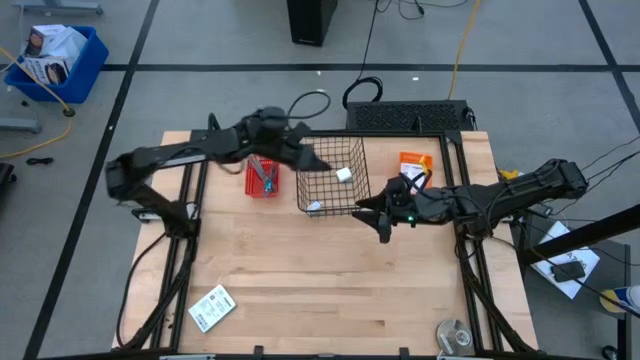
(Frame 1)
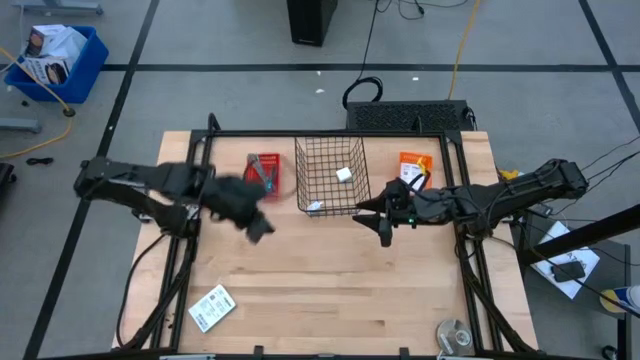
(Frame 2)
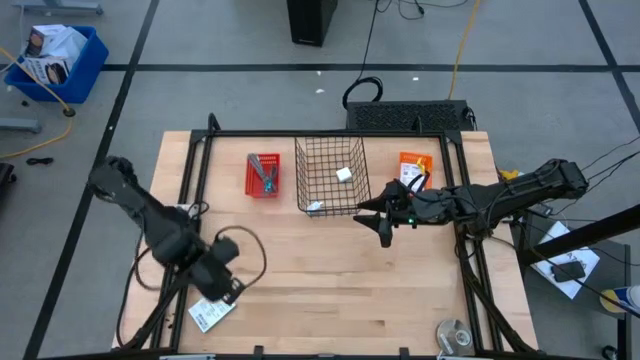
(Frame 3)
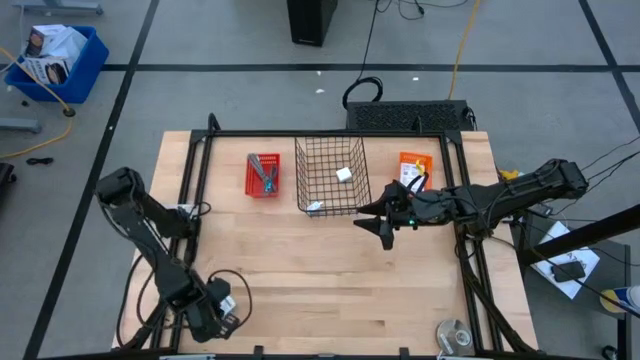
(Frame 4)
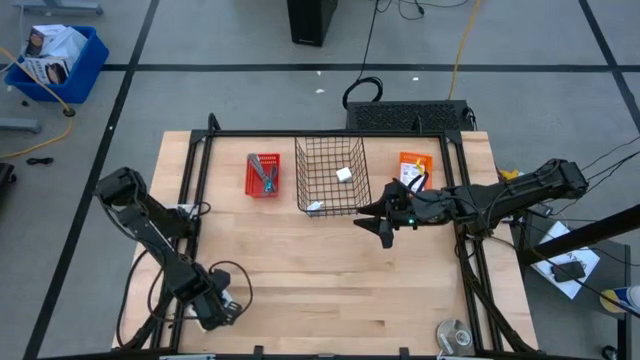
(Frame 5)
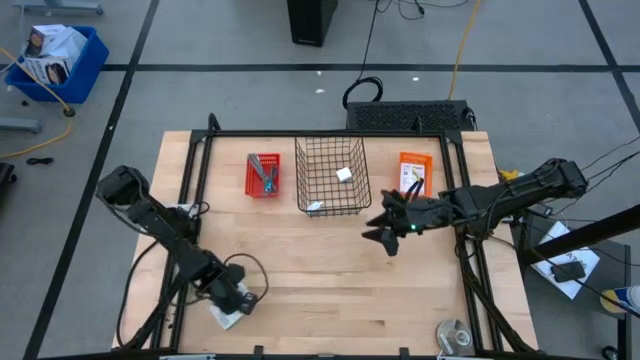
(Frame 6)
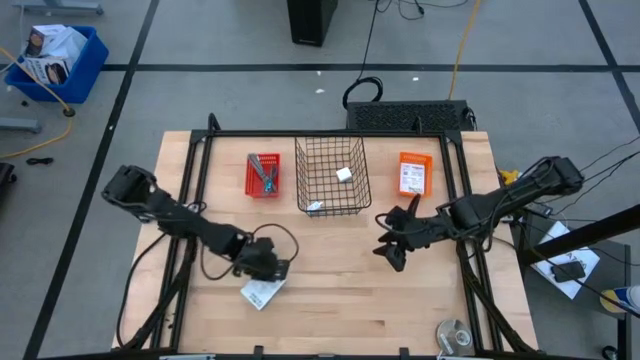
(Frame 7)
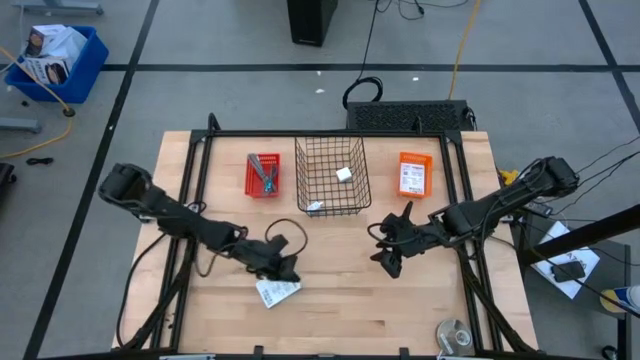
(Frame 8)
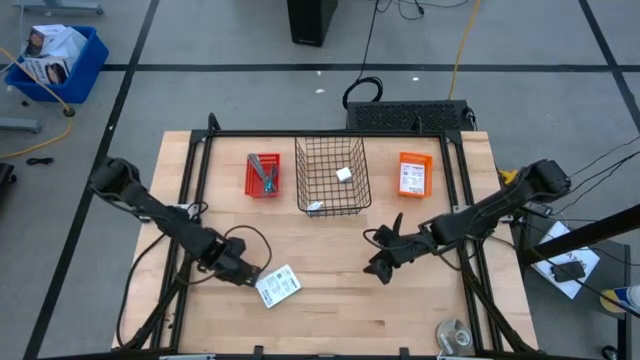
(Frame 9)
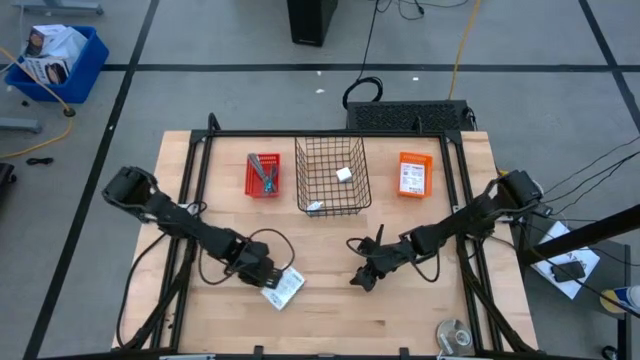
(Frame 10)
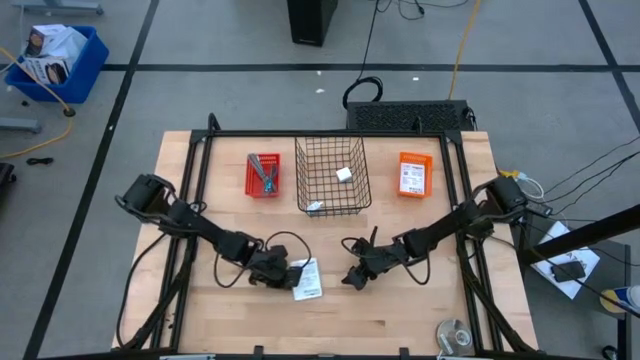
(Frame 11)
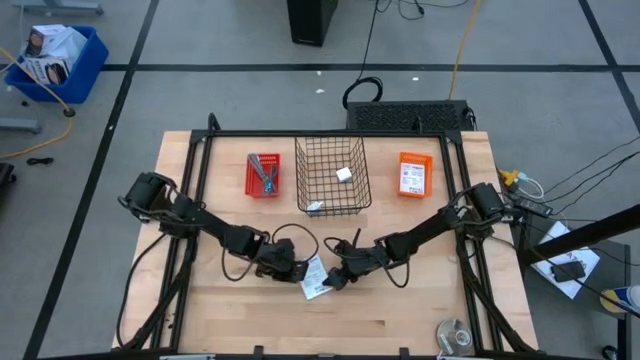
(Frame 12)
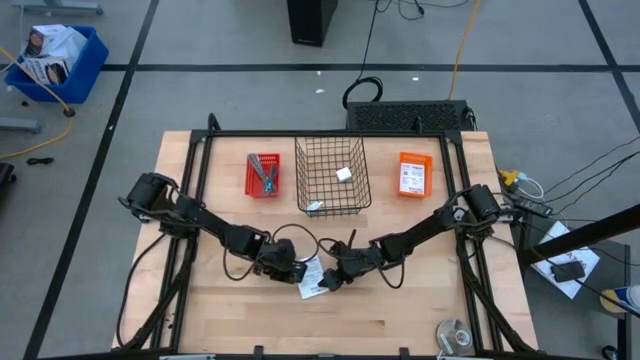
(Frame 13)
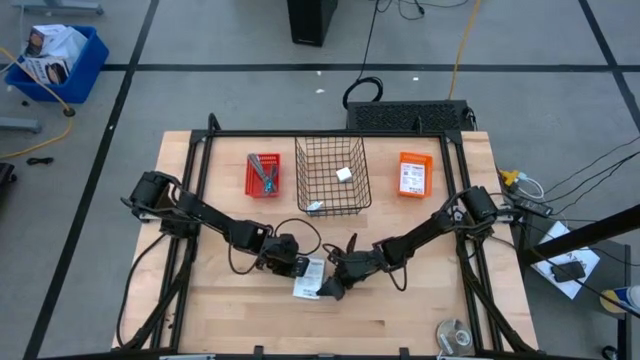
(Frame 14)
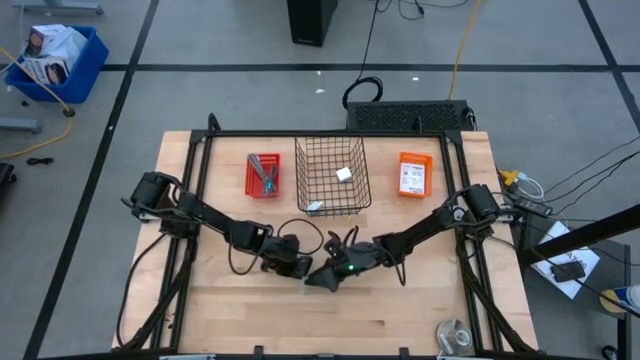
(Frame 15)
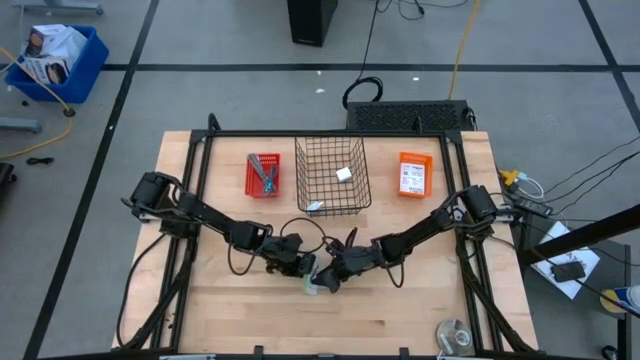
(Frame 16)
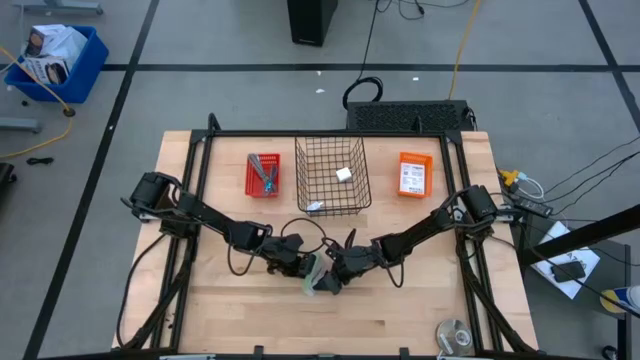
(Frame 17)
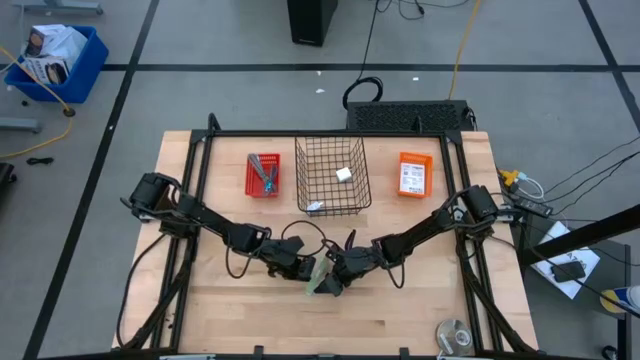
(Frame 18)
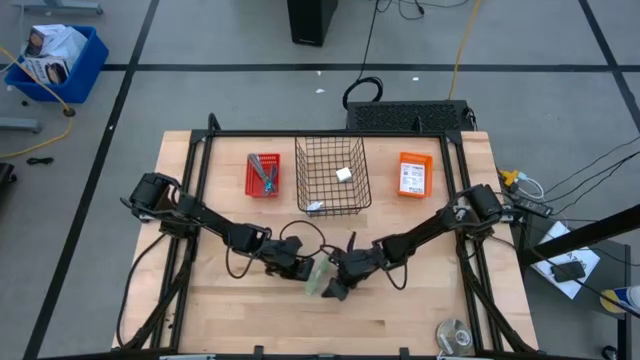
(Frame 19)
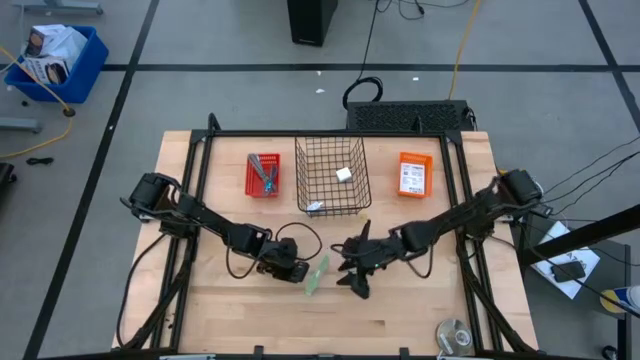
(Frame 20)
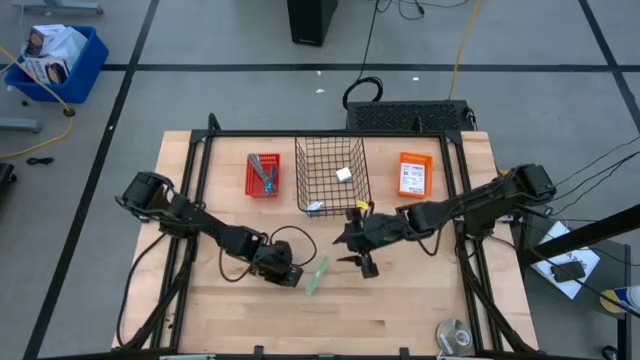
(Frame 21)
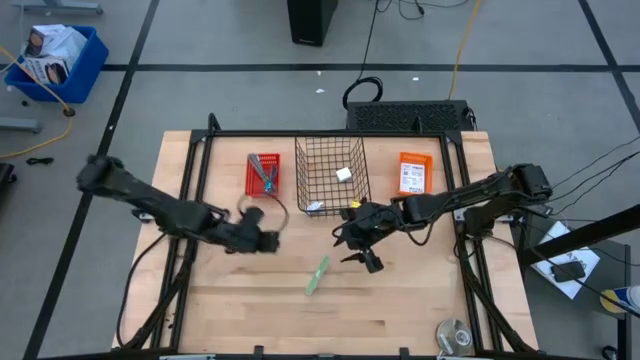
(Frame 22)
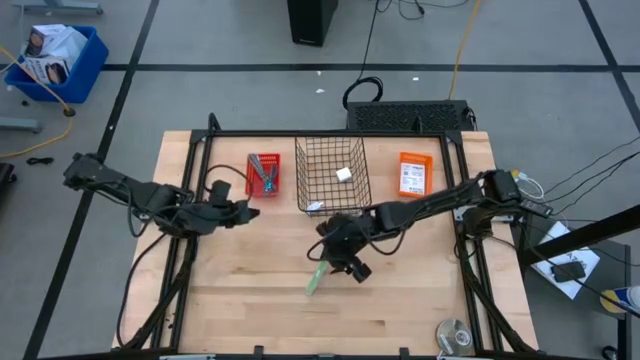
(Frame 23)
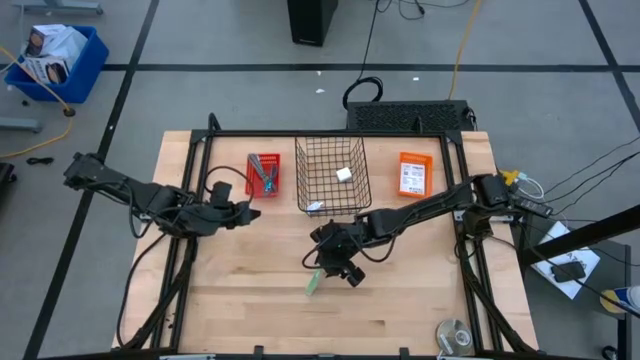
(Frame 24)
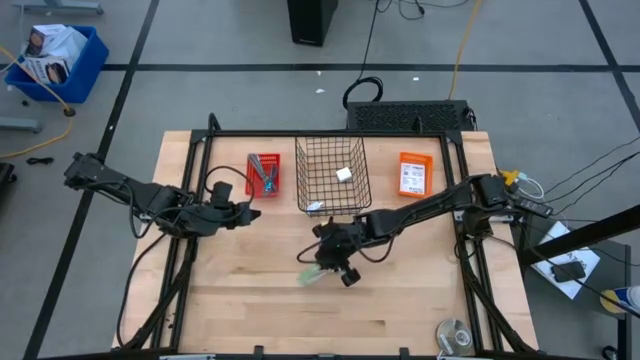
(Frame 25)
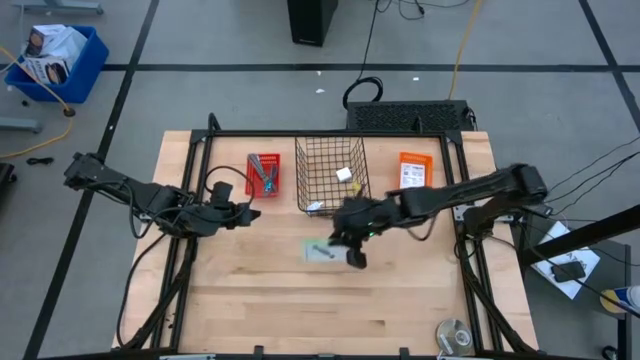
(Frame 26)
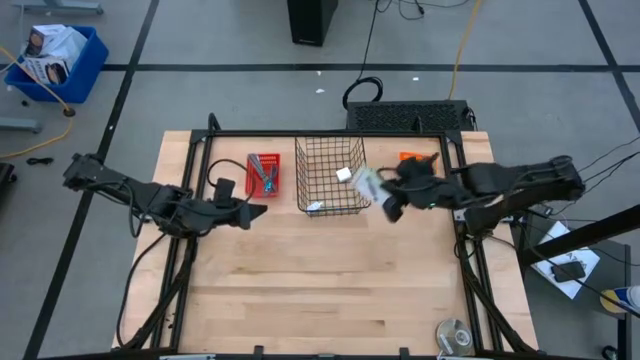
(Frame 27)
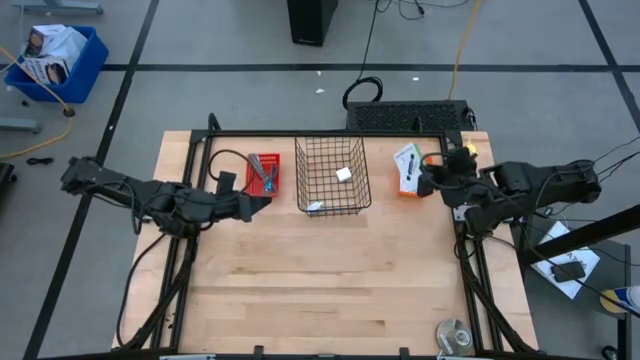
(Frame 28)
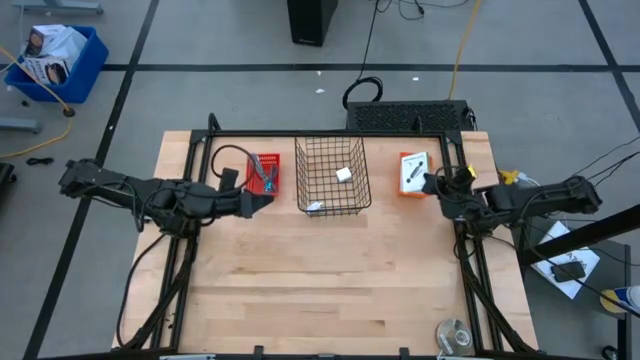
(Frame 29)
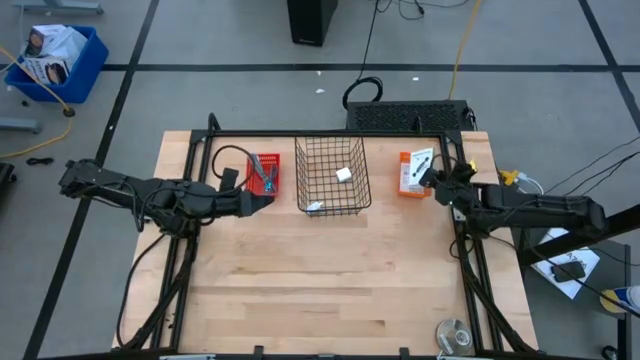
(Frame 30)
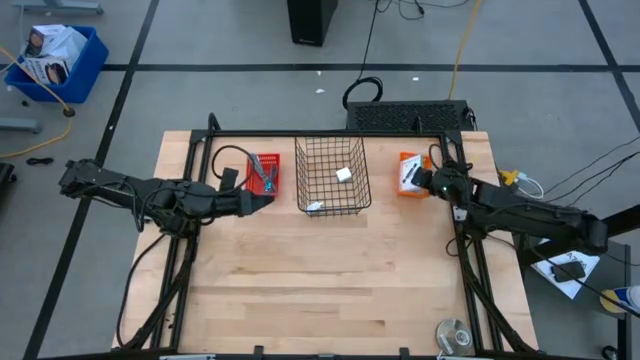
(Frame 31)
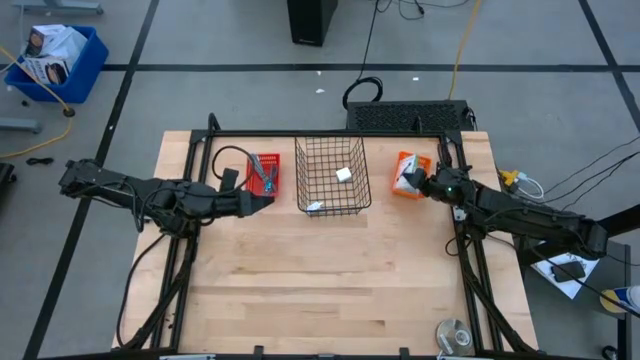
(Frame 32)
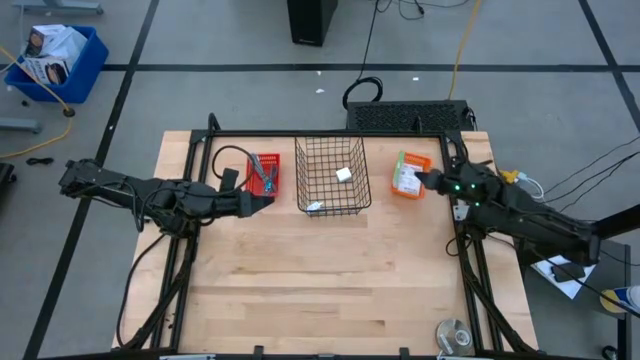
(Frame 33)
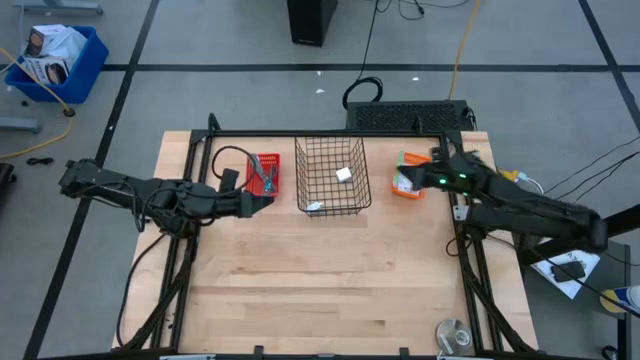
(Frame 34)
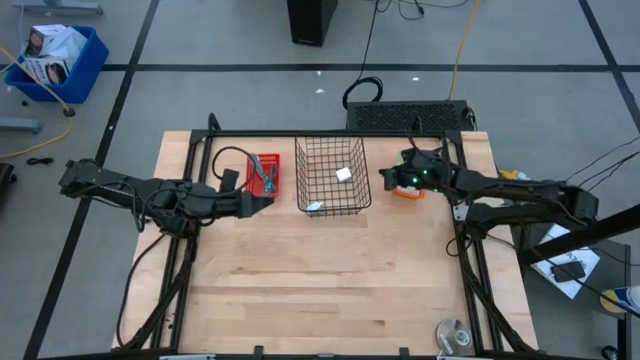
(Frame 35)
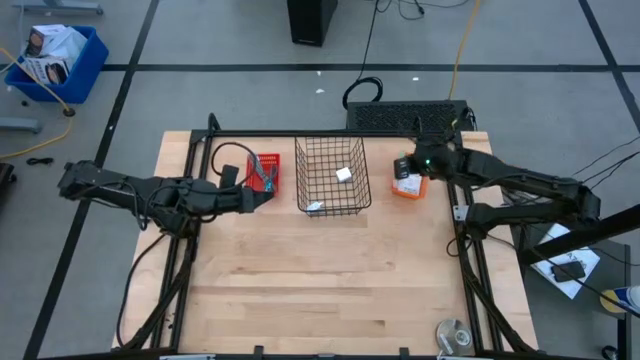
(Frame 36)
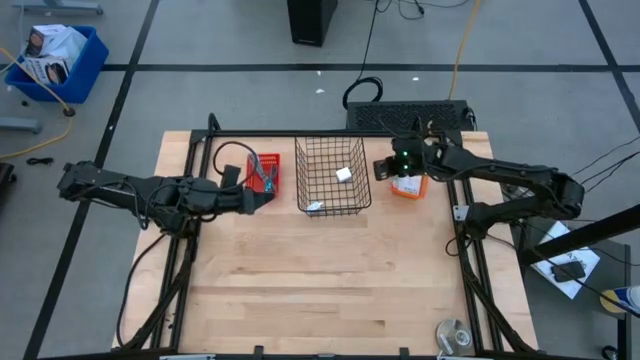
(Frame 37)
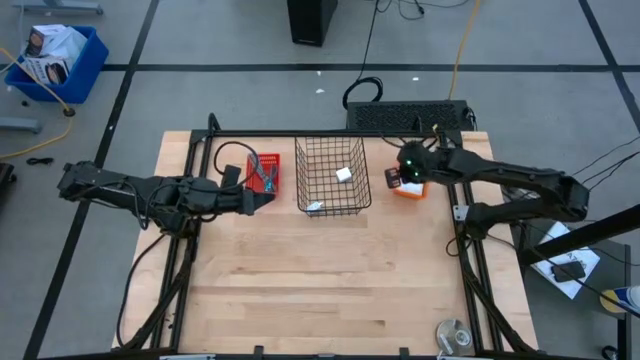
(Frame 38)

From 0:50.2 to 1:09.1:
Task: Pick and place items into bin
Stack the white box on top of the white box

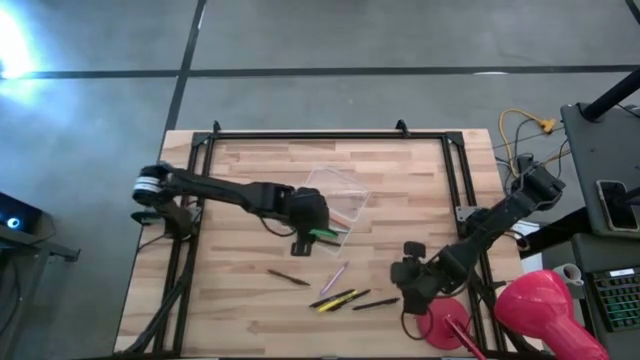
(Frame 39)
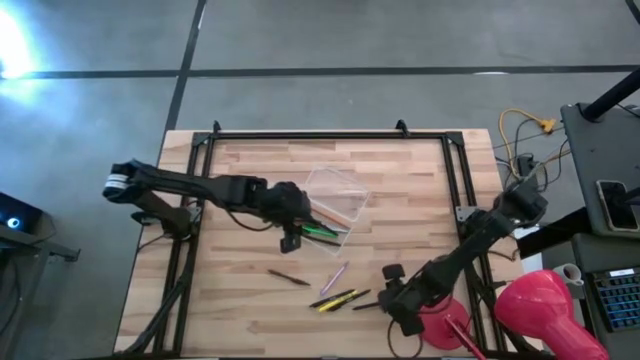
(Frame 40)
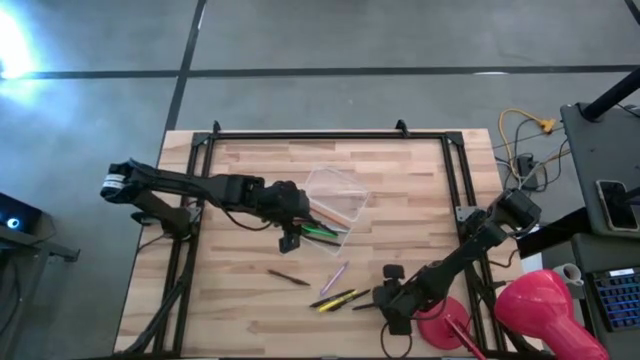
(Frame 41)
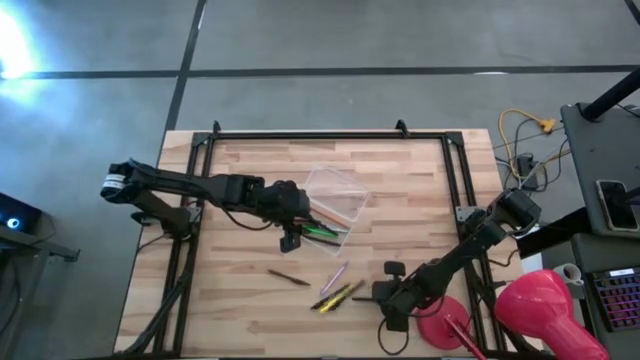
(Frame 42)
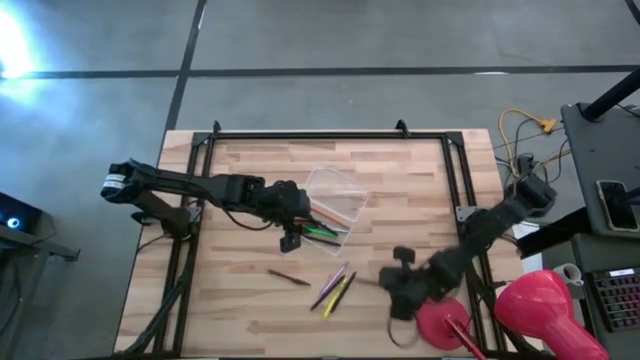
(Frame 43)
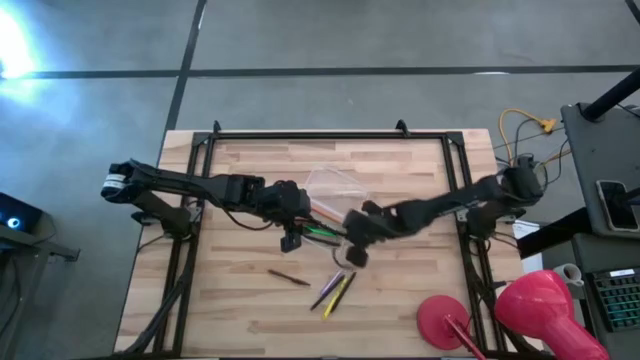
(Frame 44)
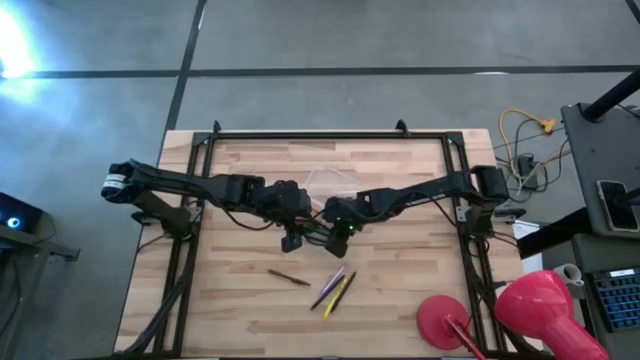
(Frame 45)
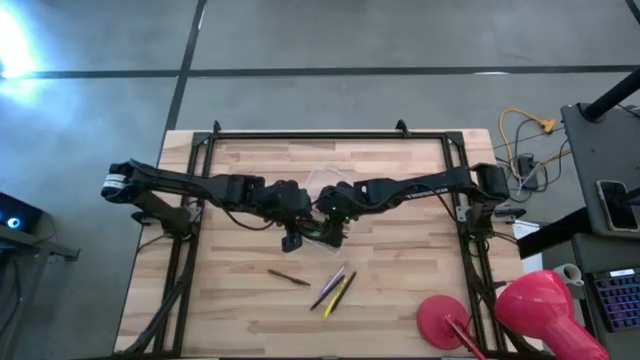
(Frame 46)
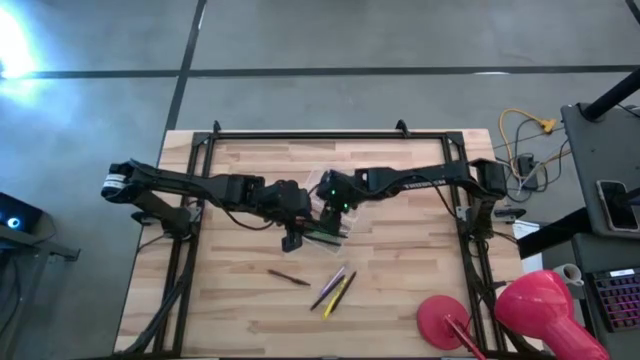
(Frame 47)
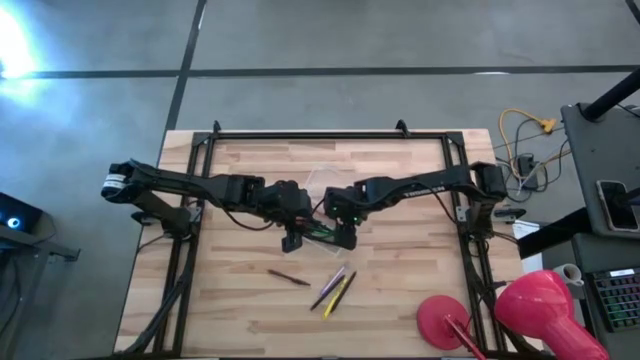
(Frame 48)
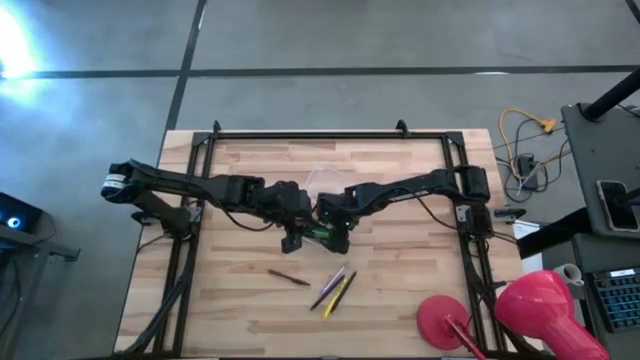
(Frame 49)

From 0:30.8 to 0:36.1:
Task: Pick & place school supplies into a supply box
Put the black pen into the transparent case
